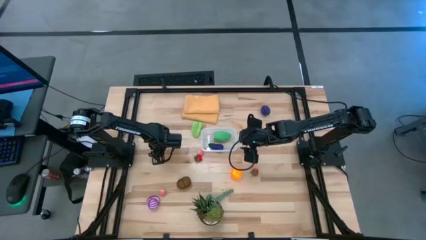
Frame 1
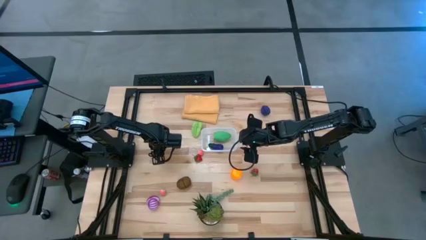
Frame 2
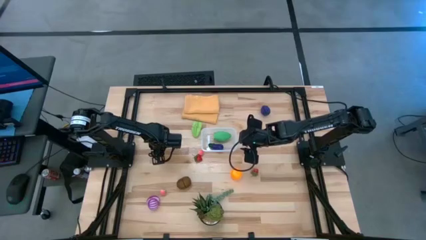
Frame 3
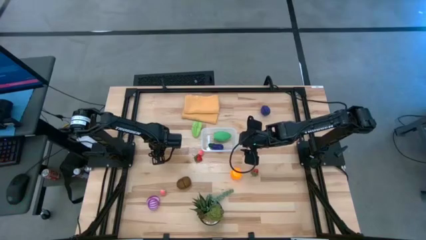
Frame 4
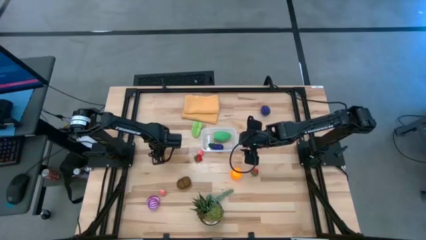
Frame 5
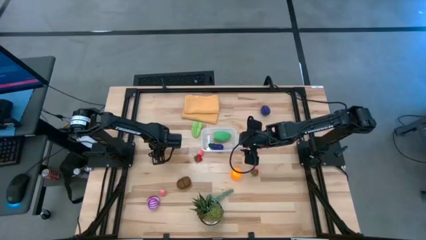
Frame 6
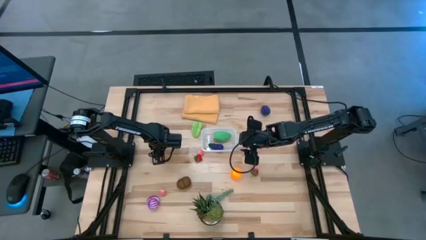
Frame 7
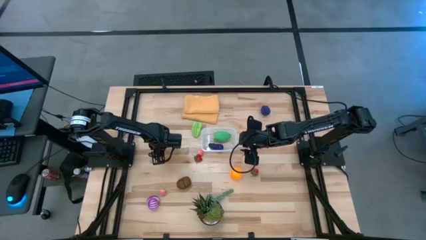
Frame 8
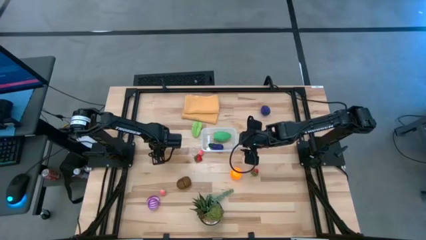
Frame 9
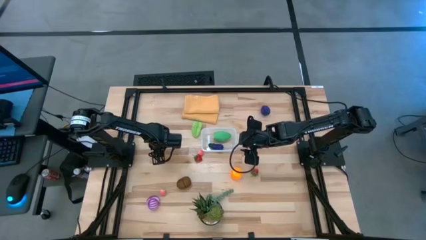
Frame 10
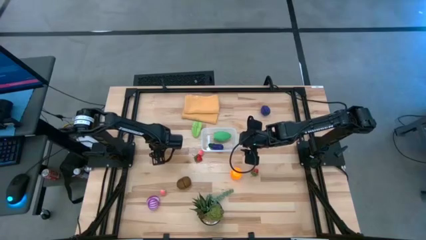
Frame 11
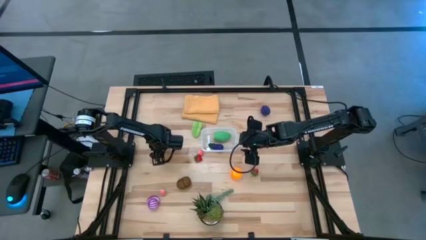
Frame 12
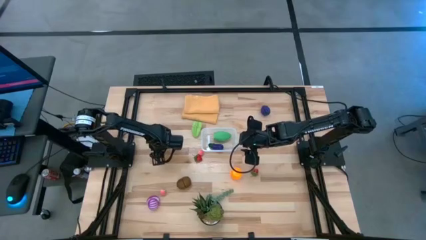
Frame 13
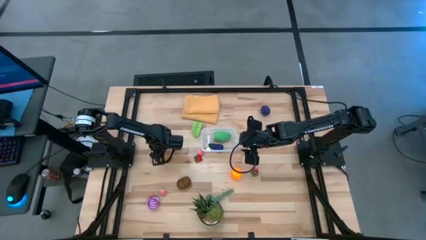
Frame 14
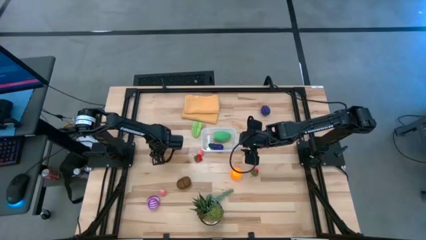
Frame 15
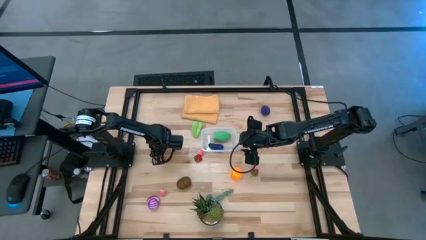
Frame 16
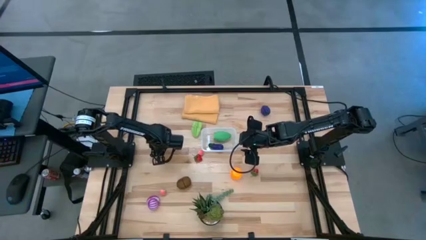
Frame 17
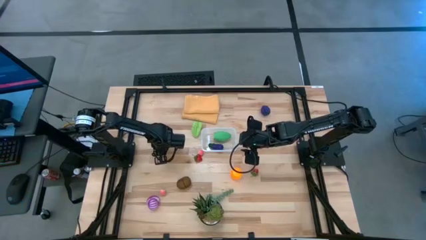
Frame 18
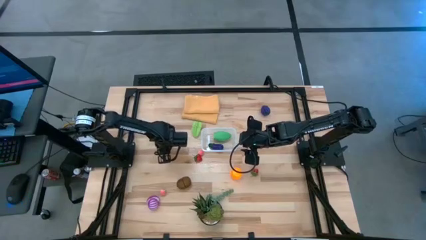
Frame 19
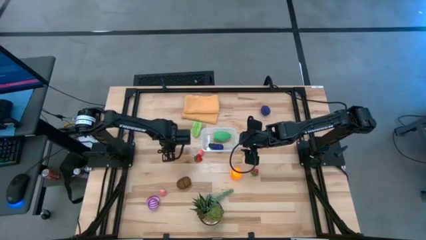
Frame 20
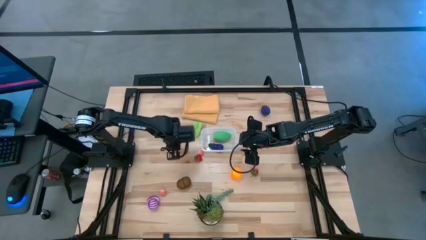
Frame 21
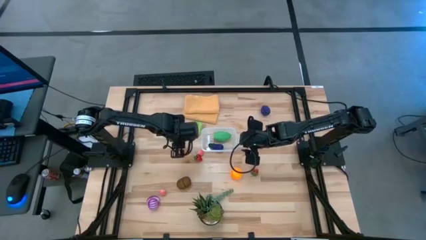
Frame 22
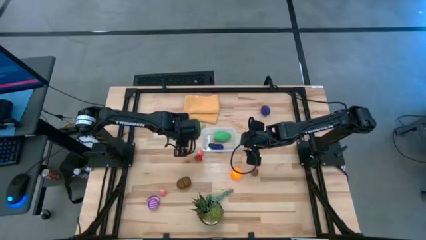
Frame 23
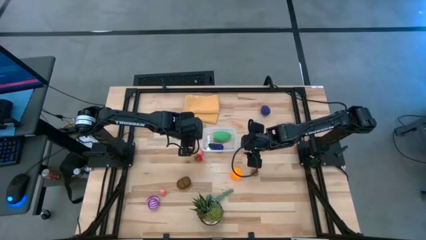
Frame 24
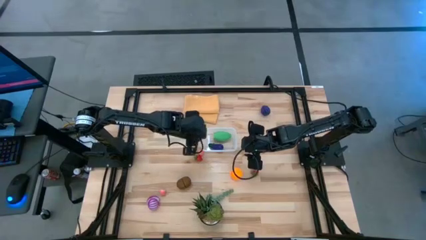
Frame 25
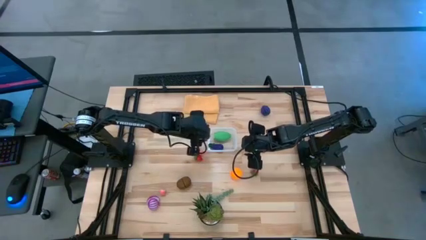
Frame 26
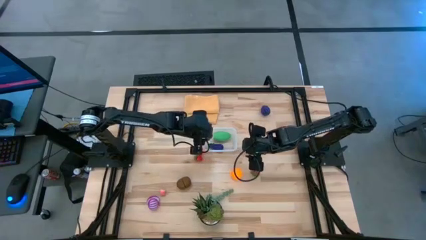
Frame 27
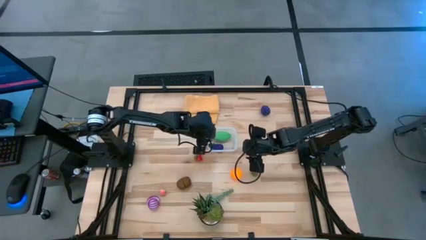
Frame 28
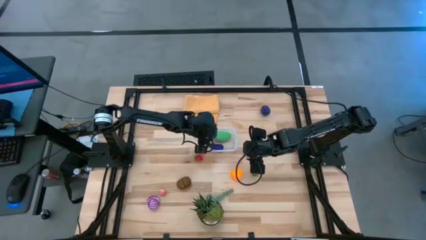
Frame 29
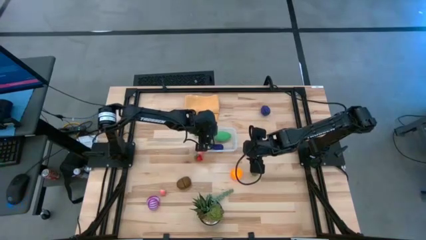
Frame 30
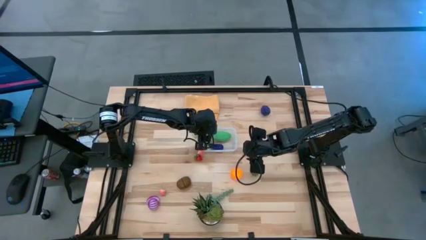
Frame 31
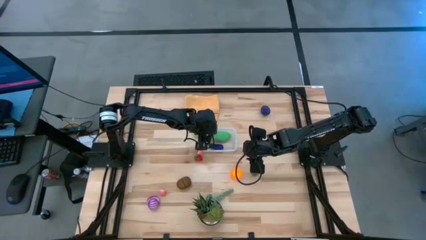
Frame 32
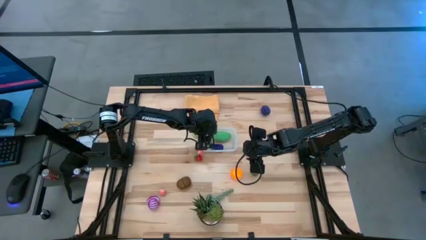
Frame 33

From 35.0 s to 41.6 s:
Task: Pick and placing Produce into tupperware
Put the left red strawberry into the transparent container

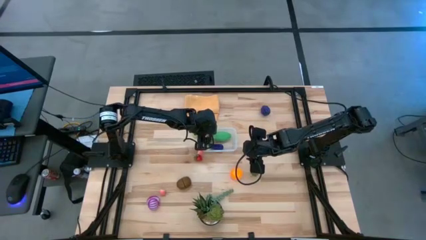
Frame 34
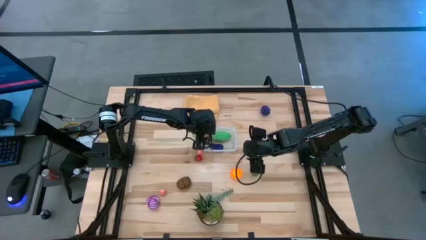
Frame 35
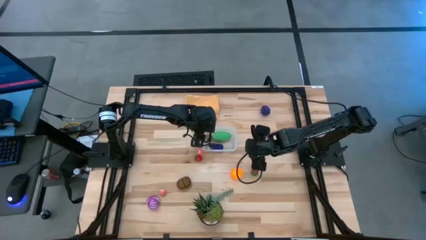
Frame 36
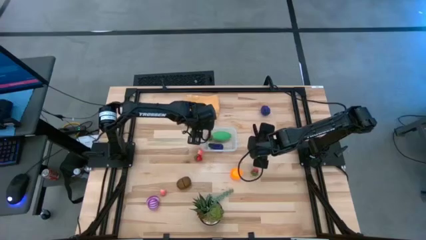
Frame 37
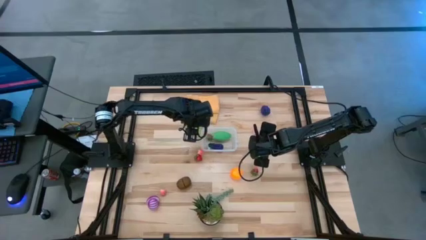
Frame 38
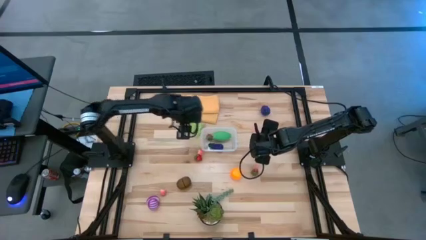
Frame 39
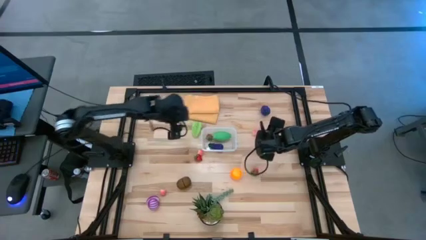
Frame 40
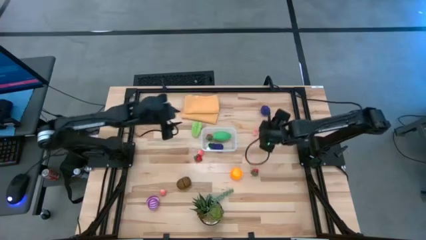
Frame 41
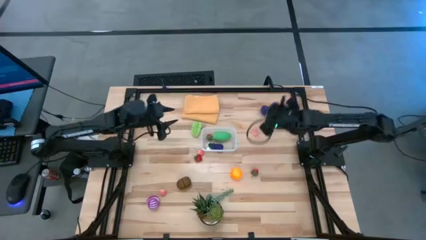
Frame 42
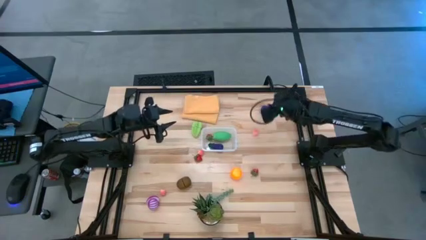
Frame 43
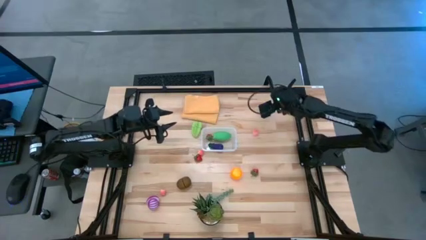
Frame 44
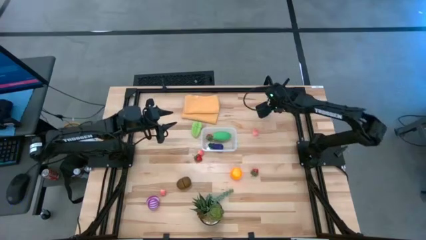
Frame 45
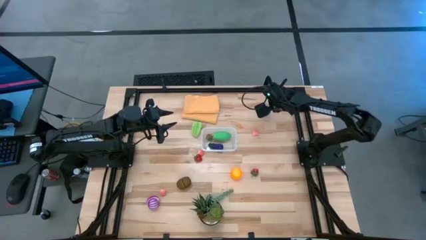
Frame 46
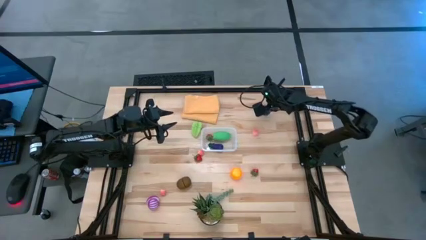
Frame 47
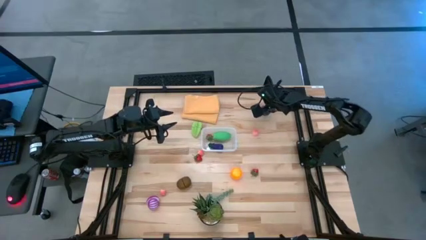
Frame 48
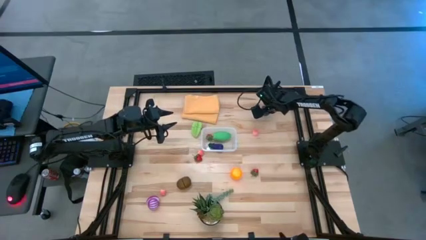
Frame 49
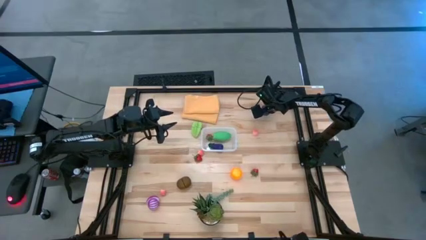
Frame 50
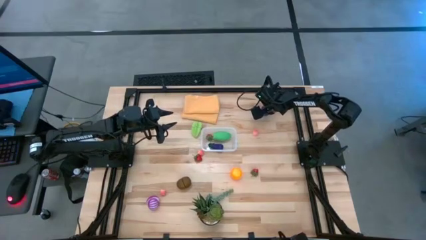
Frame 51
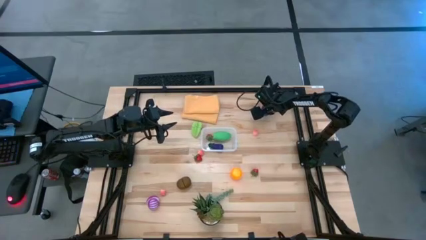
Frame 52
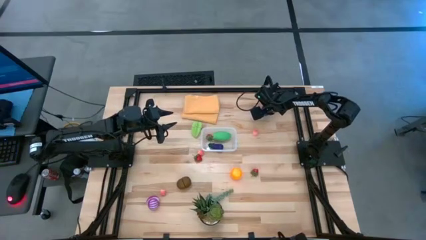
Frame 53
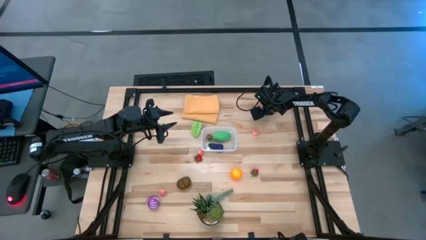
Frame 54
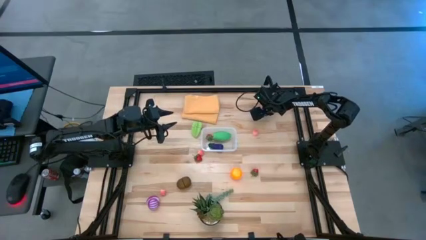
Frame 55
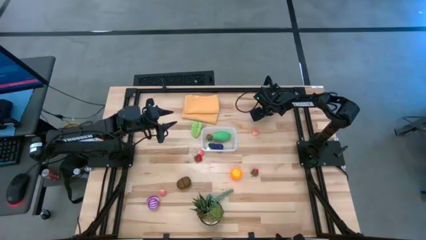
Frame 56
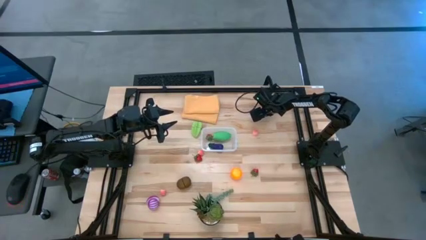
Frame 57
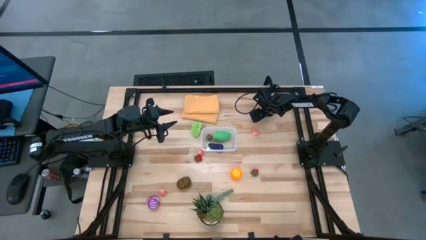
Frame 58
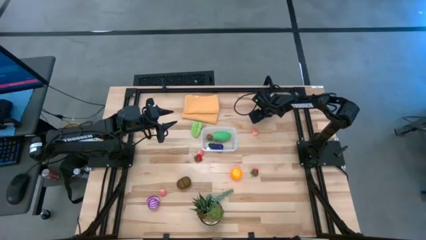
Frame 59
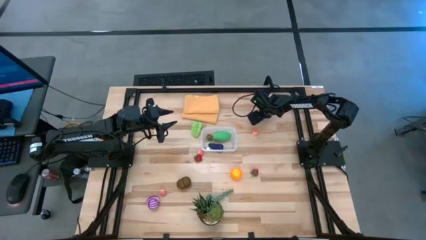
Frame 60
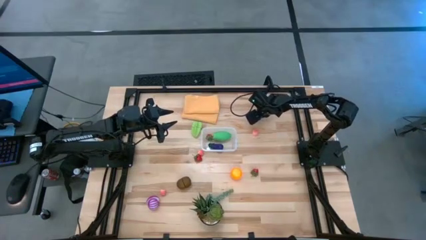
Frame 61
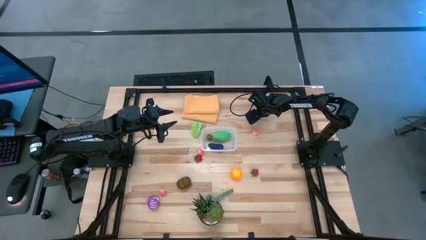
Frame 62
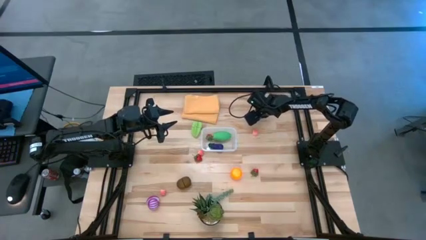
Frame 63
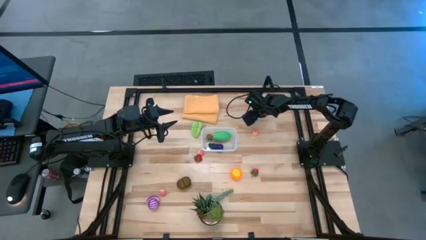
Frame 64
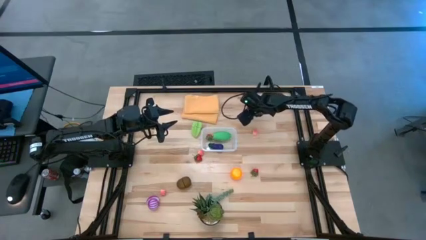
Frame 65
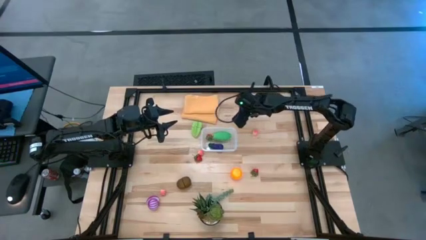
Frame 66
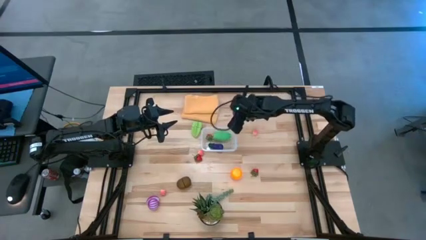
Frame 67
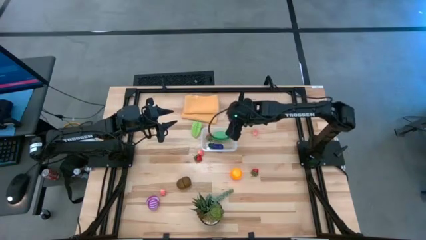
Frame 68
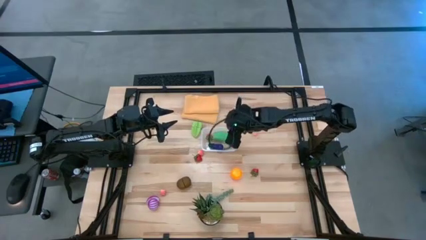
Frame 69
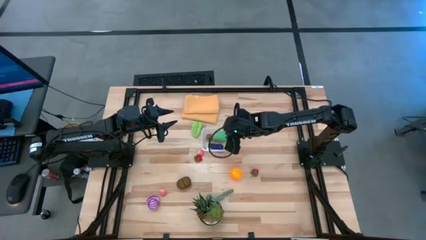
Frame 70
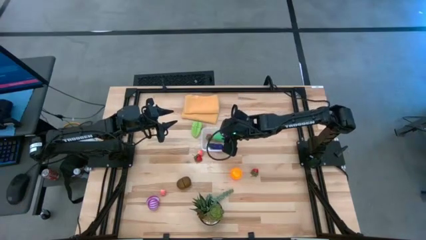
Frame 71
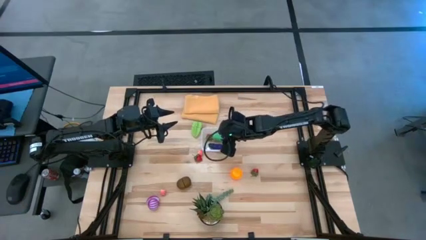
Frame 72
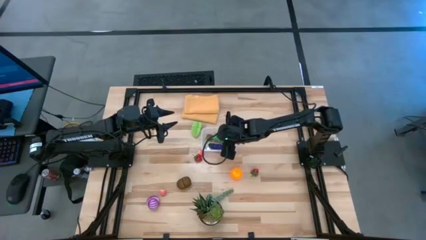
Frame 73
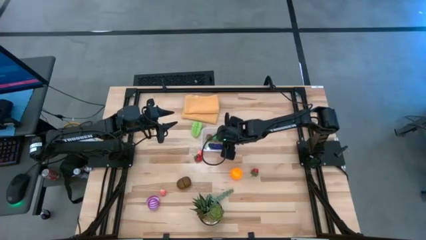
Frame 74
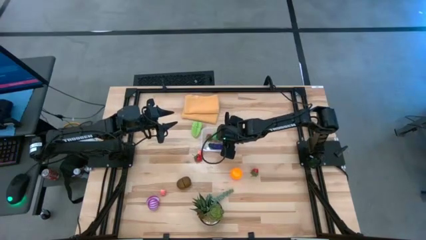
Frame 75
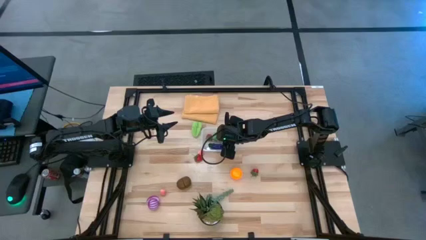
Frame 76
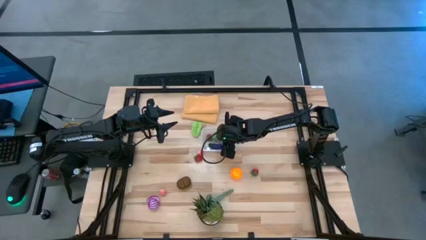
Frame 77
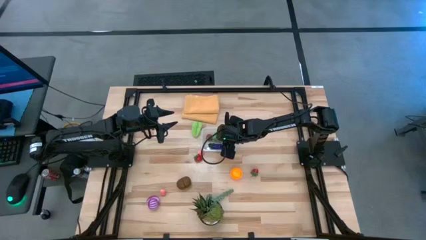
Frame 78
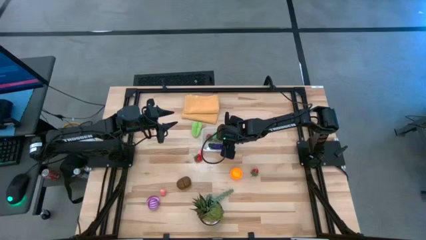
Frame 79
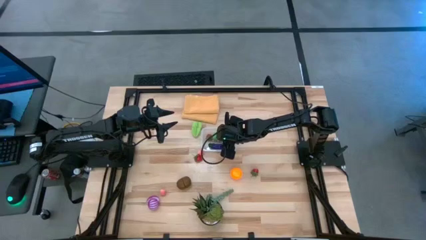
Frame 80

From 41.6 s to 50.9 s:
Put the violet grape into the transparent container
